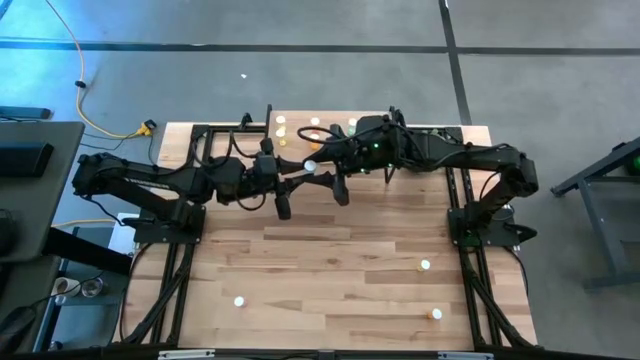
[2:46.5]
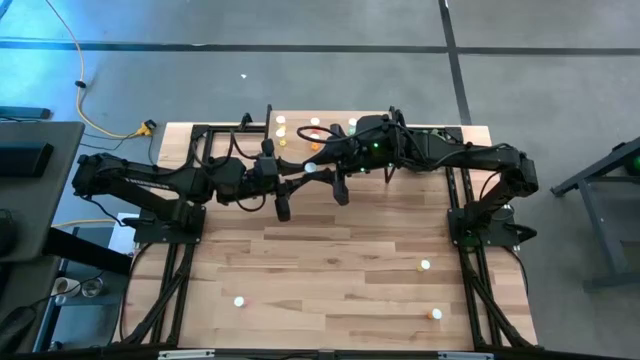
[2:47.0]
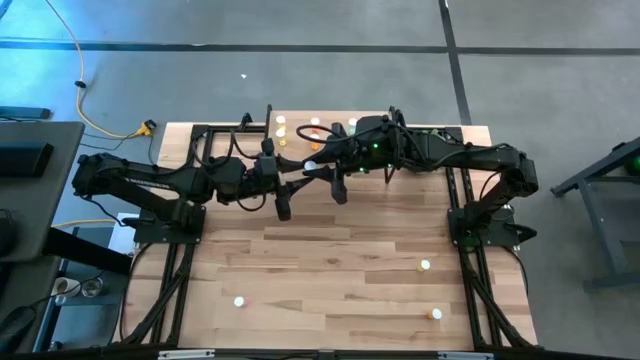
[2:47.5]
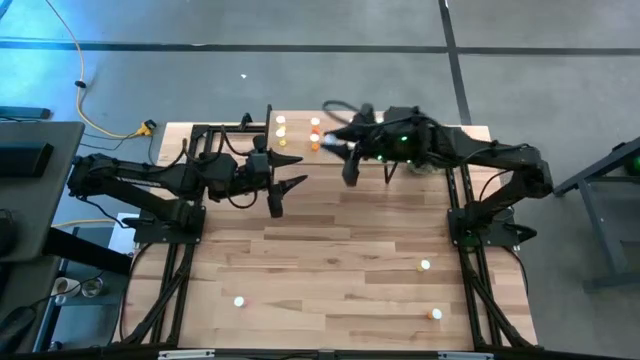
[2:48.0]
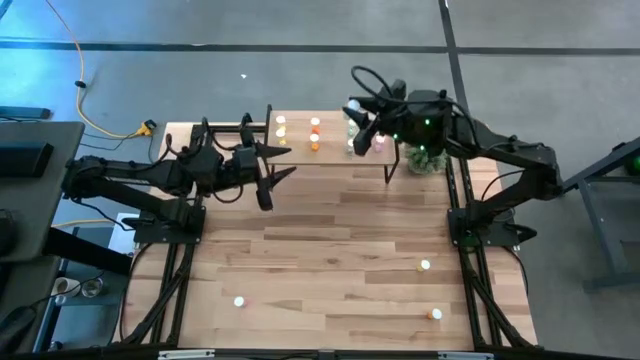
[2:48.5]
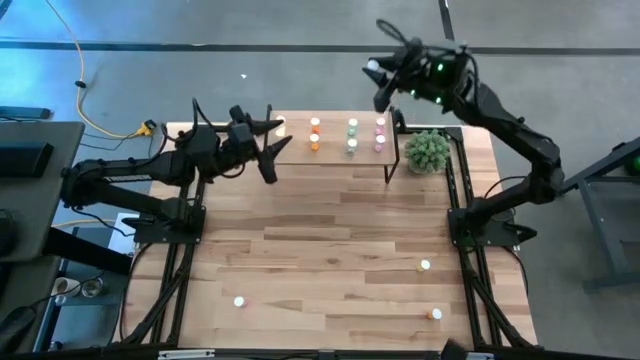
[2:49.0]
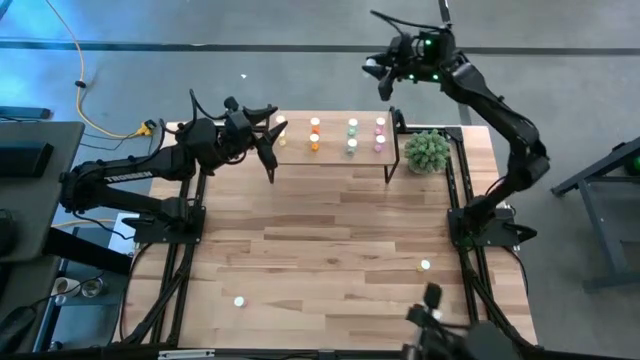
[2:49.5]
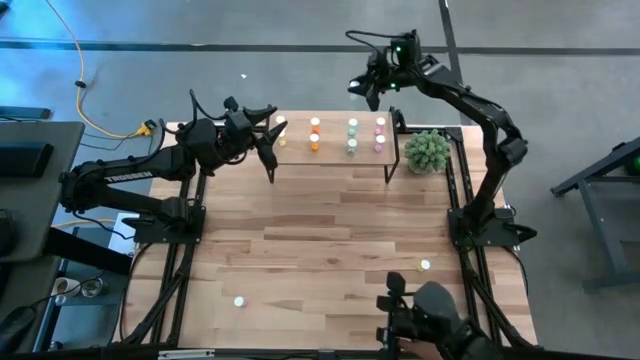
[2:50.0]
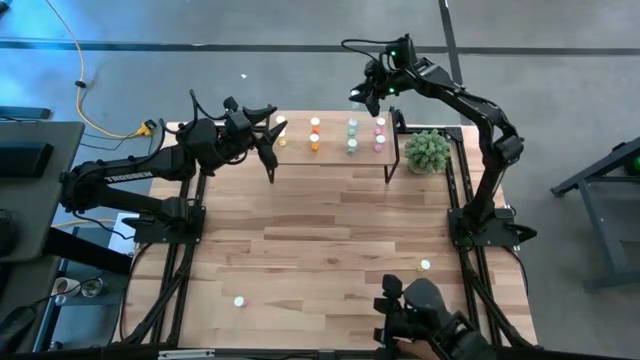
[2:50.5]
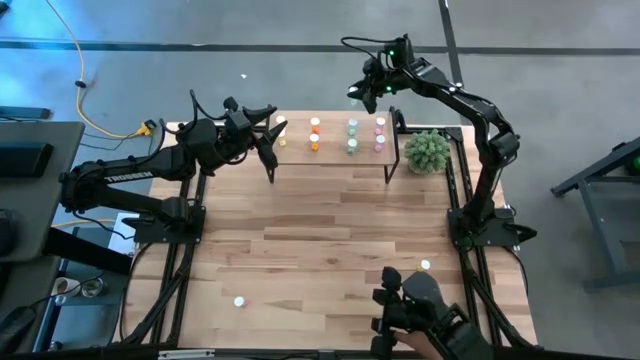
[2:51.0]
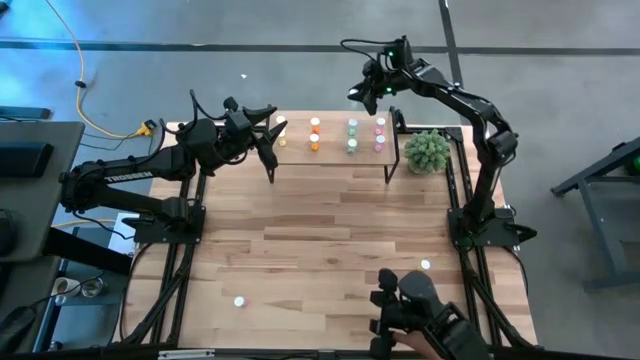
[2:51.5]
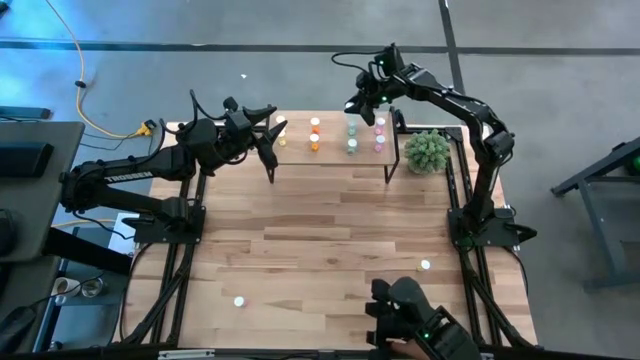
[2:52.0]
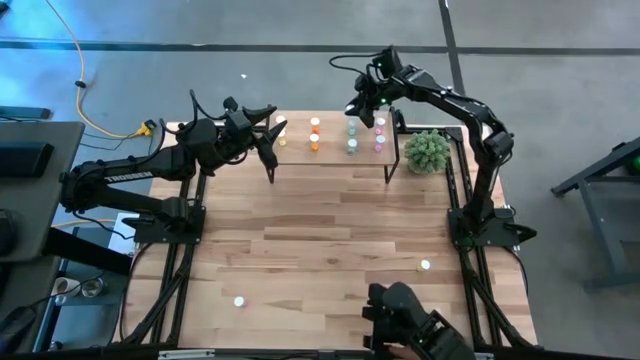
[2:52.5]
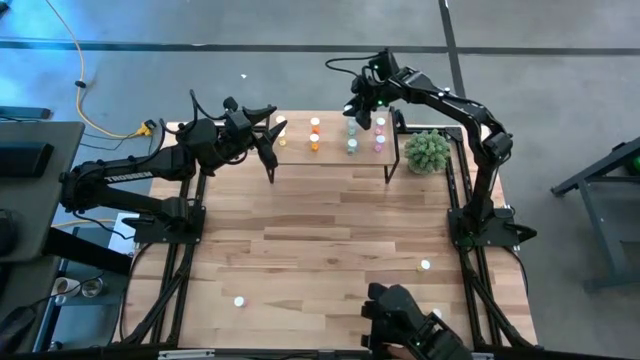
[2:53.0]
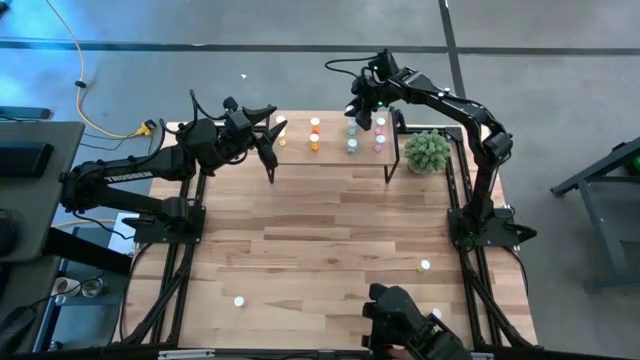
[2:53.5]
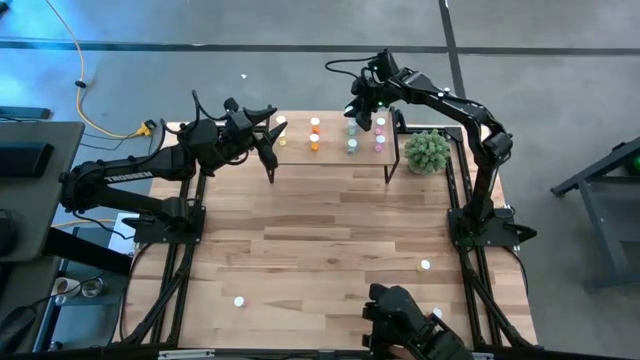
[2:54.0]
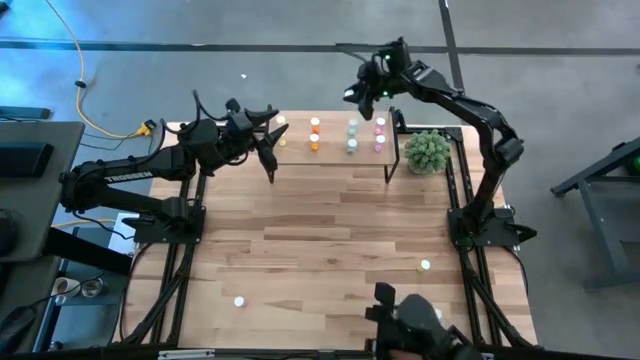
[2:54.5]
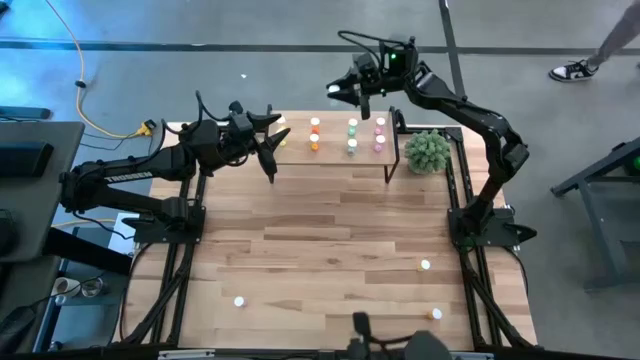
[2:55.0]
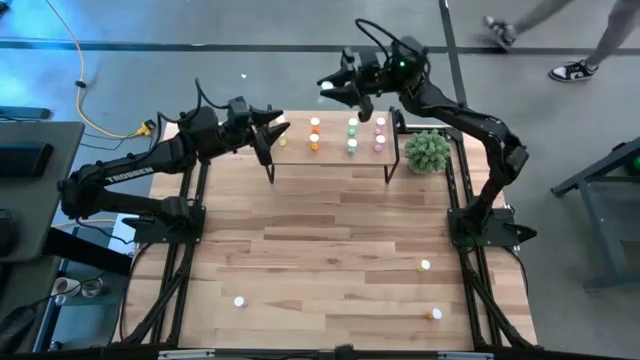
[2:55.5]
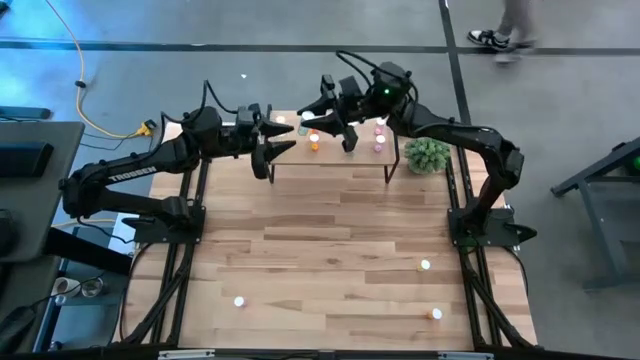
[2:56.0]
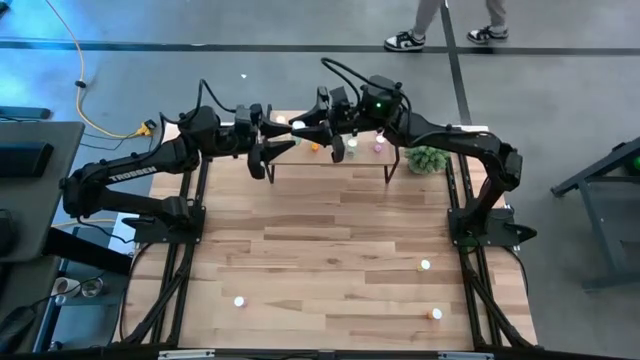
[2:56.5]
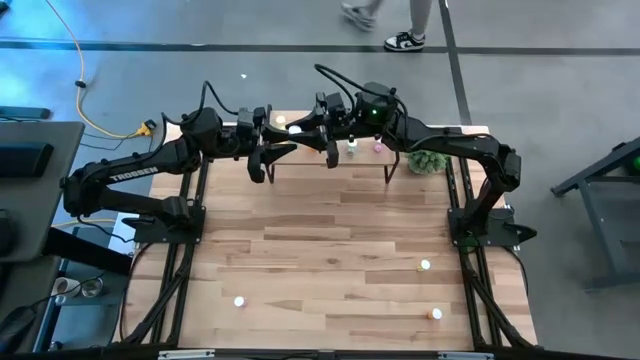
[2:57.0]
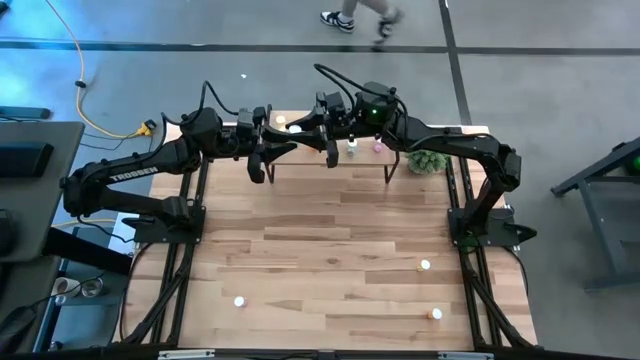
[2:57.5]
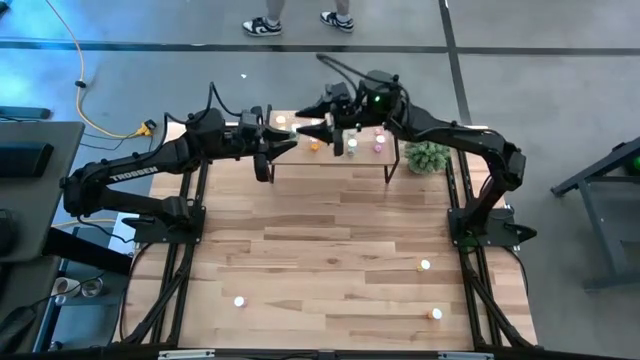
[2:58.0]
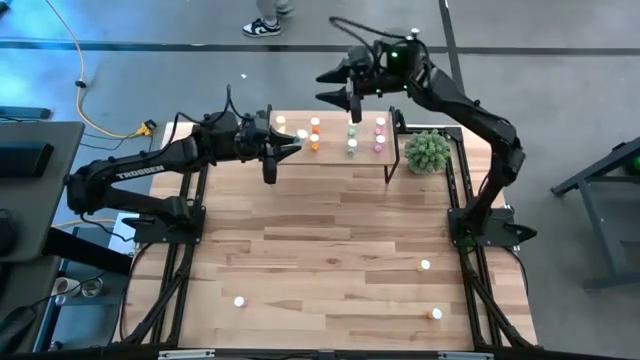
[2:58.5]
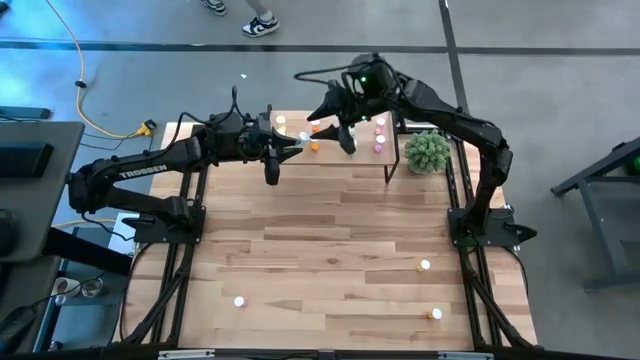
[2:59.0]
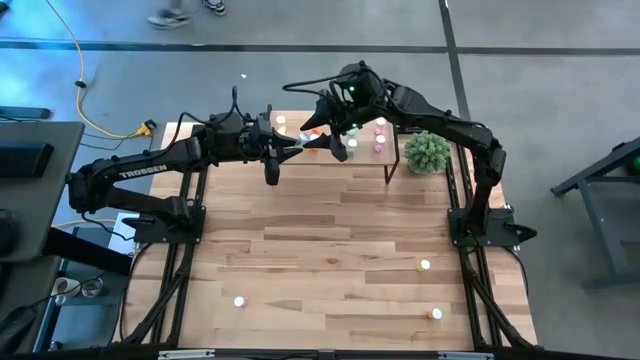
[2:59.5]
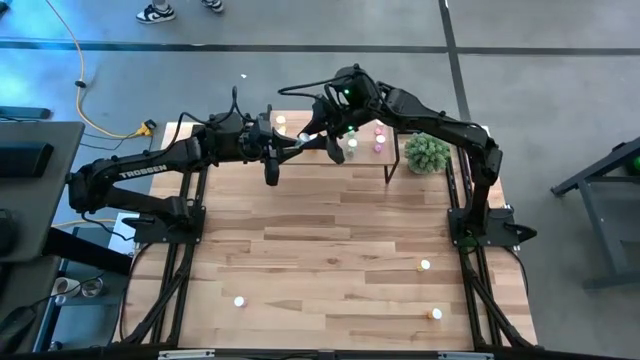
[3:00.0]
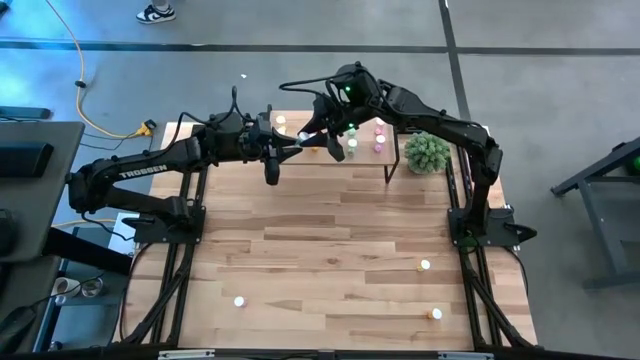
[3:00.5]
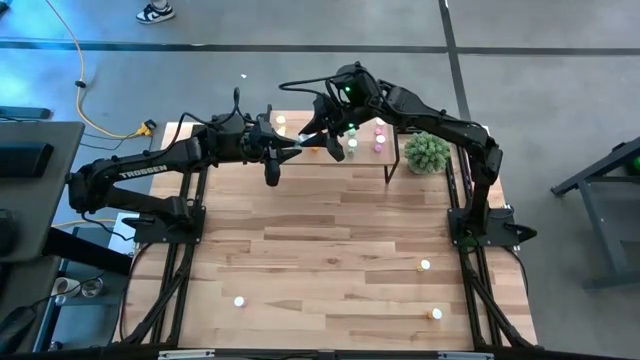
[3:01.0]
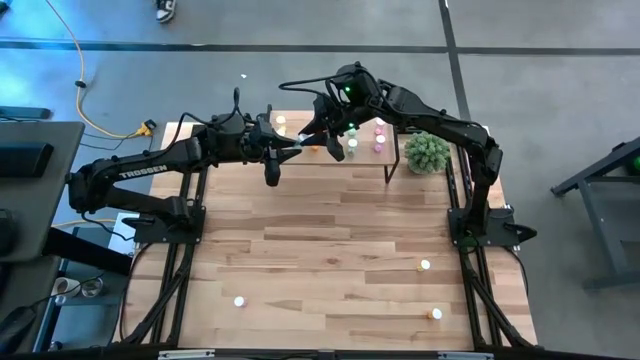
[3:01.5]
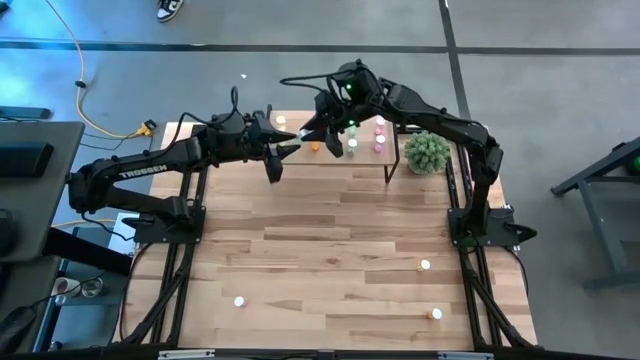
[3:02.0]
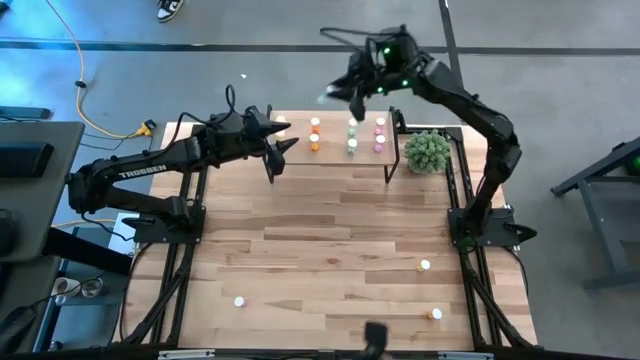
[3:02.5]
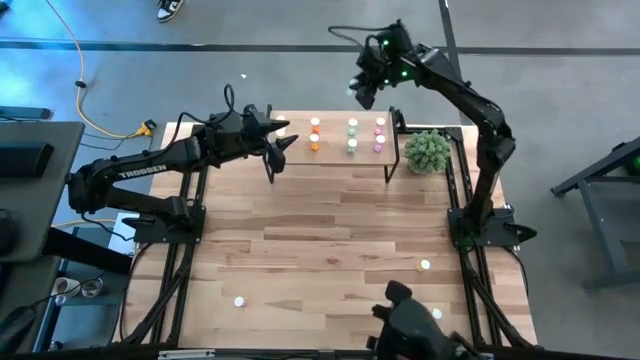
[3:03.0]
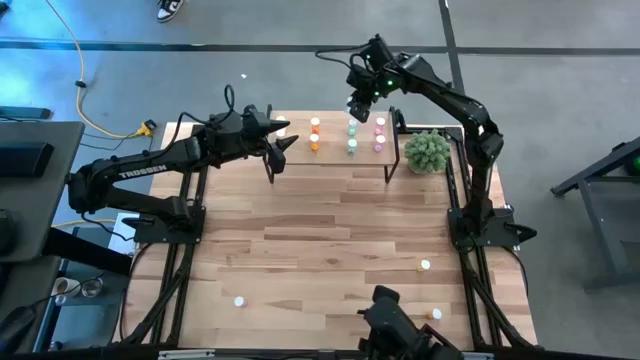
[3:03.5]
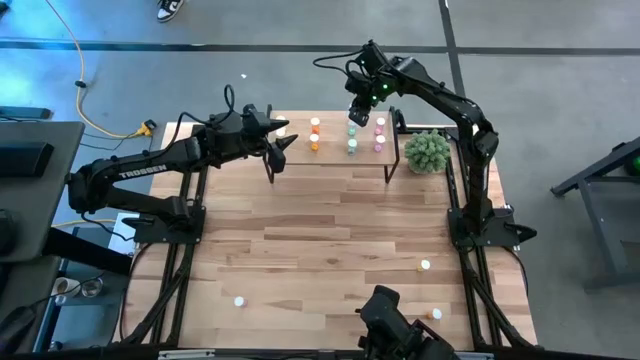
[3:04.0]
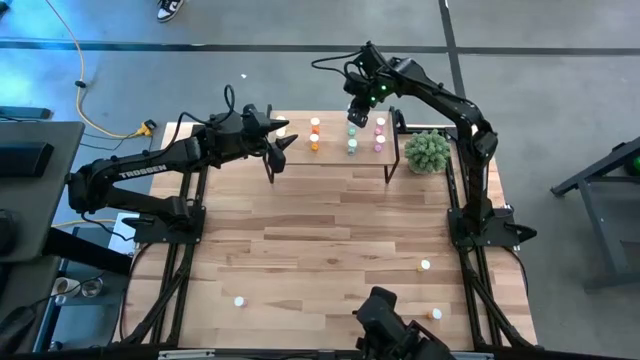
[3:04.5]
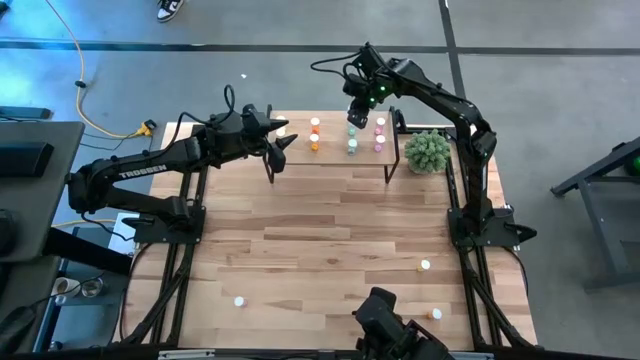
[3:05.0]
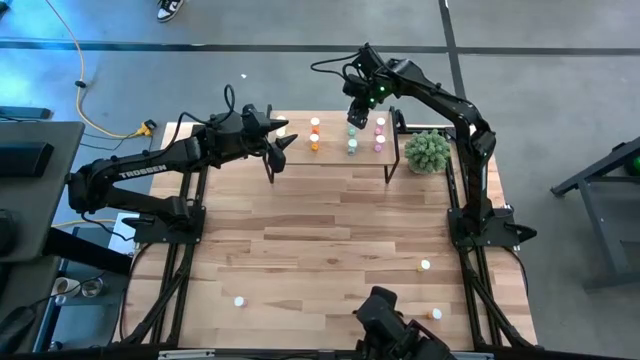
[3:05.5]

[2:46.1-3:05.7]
Task: Pick and place medicine bottles onto shelf by color
Put the blue pill bottle on the shelf aligned with the other blue pill bottles

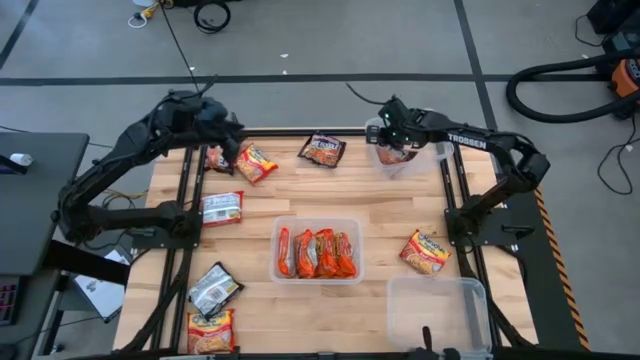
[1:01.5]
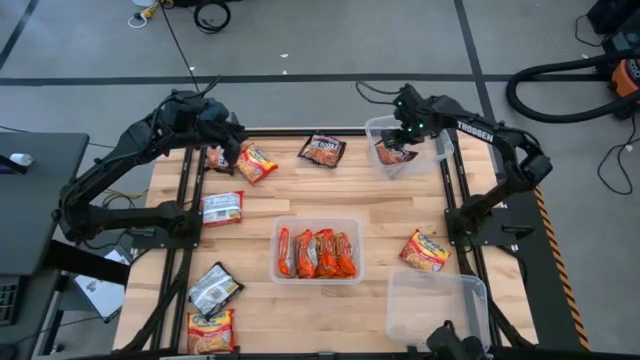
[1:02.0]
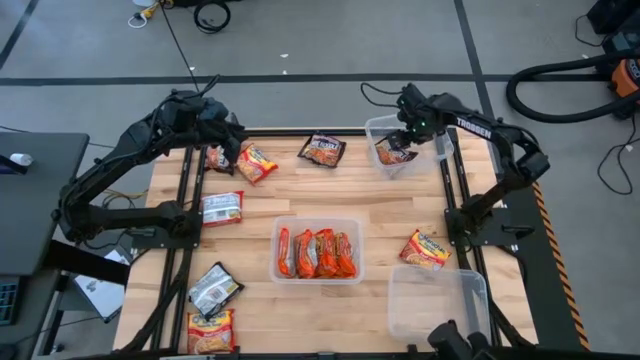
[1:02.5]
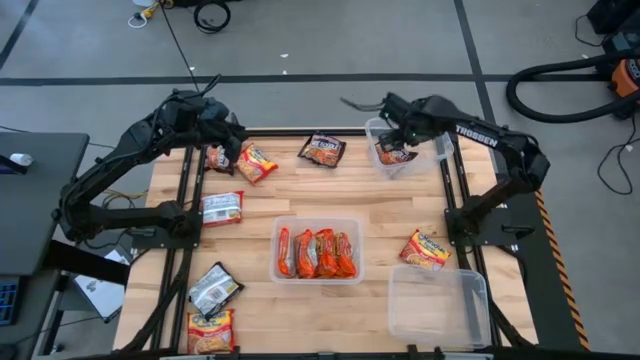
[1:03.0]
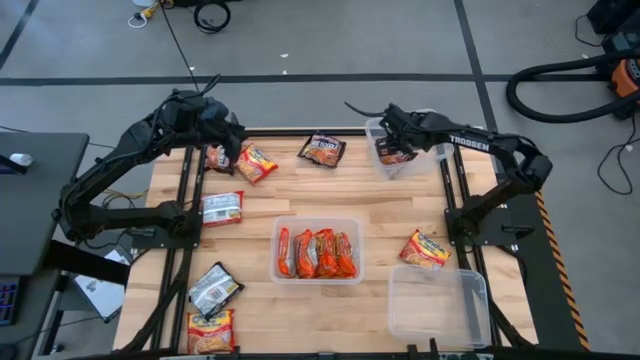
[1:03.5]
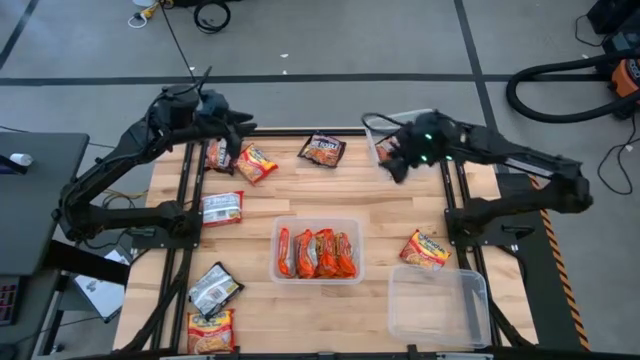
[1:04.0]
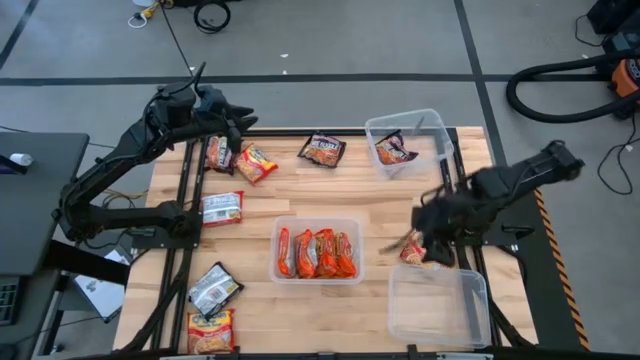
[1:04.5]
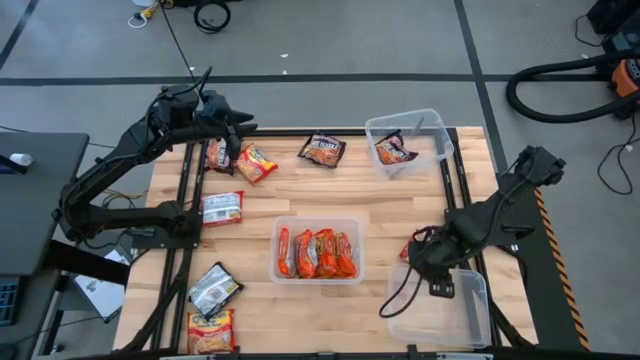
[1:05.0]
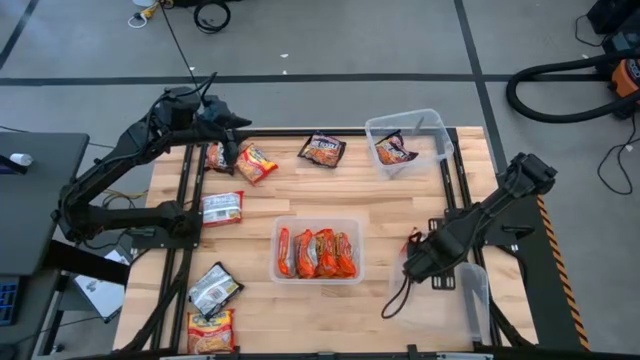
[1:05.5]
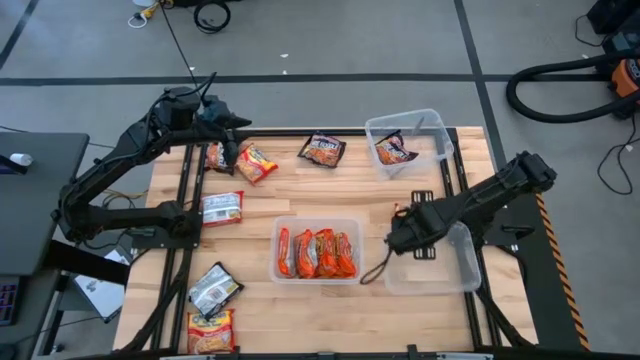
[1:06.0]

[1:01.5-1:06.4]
Task: Sort Maruchan noodles
Move the bottom right transparent bin to the middle right of the table
